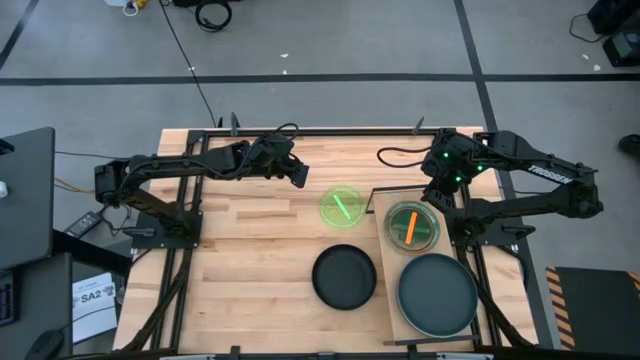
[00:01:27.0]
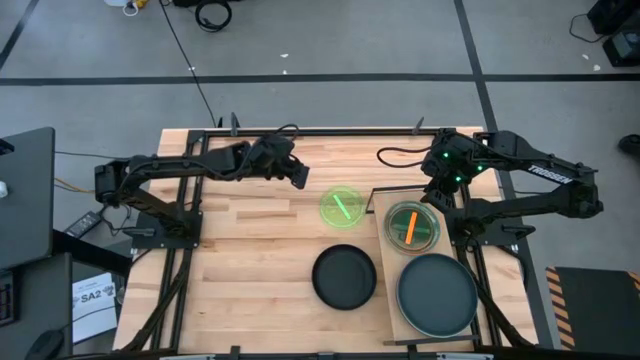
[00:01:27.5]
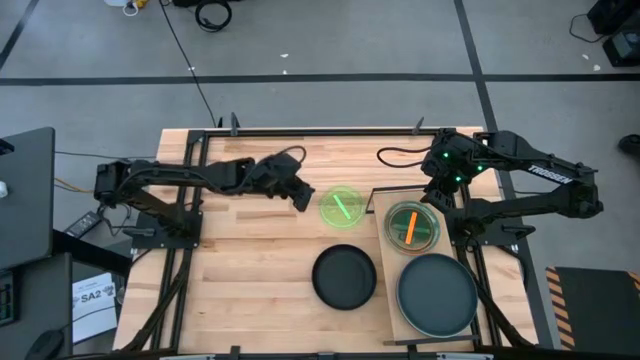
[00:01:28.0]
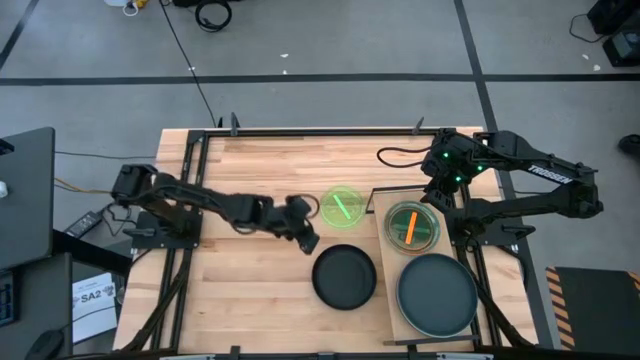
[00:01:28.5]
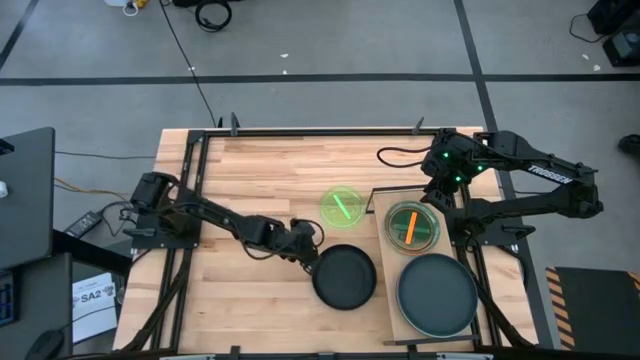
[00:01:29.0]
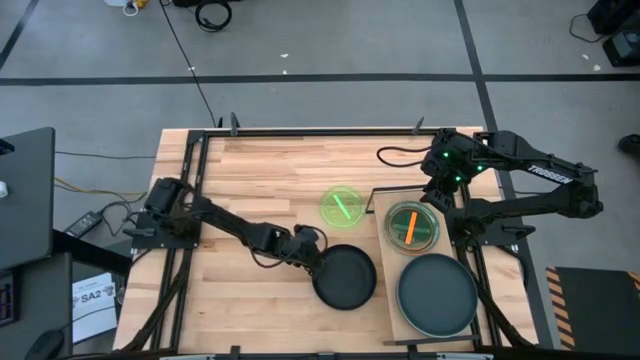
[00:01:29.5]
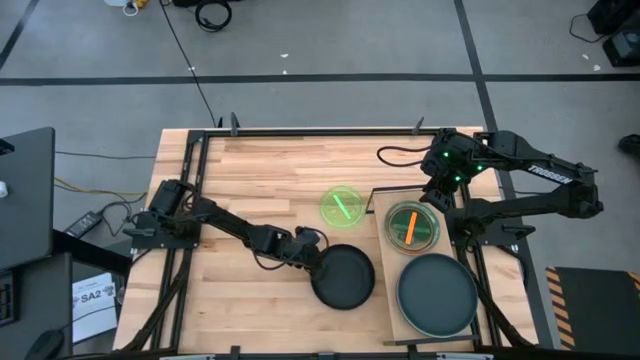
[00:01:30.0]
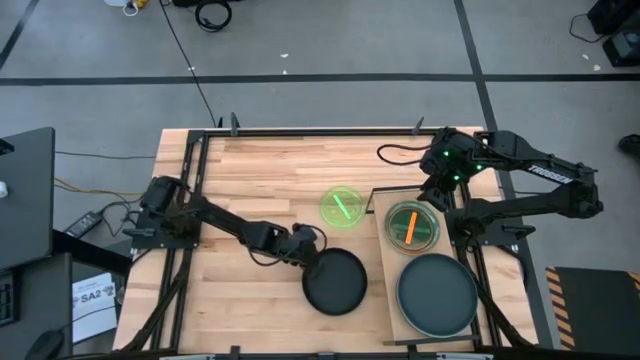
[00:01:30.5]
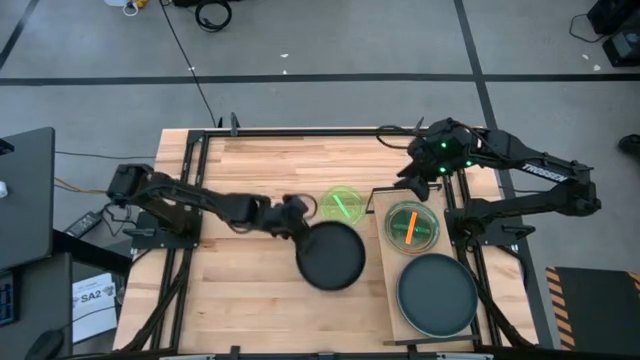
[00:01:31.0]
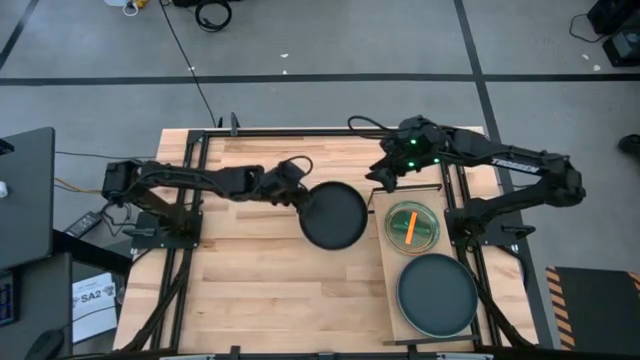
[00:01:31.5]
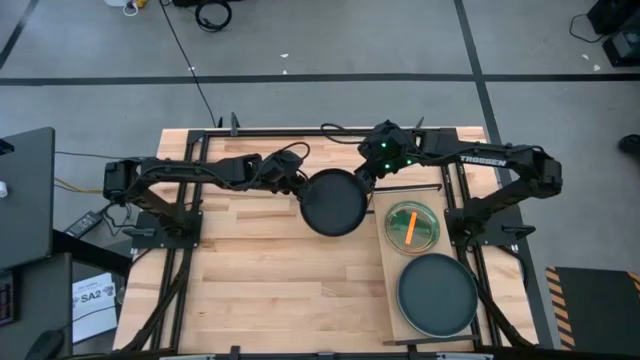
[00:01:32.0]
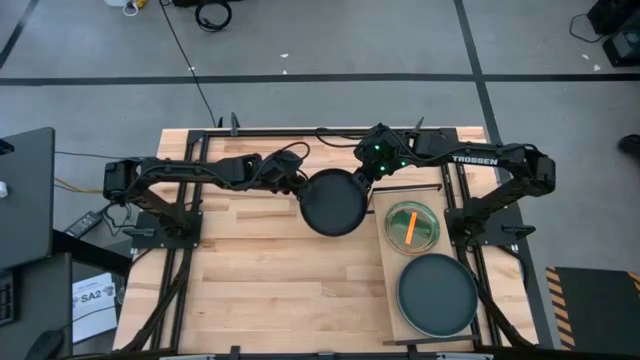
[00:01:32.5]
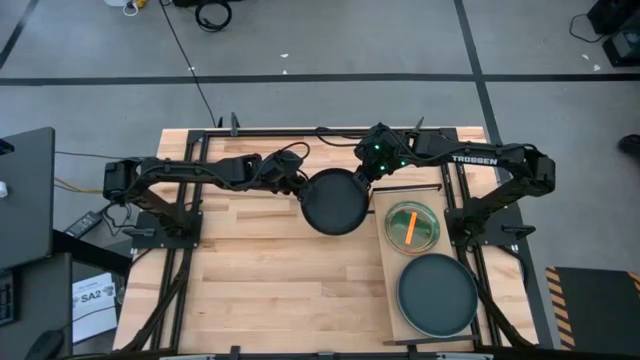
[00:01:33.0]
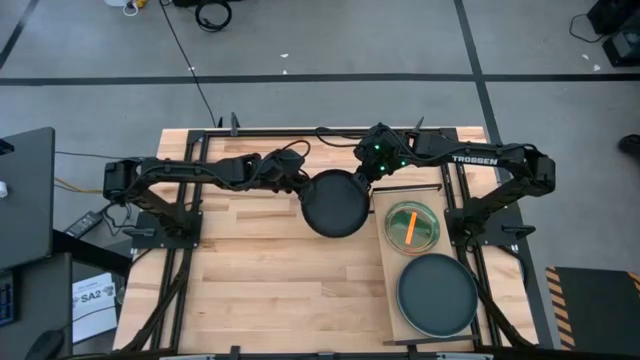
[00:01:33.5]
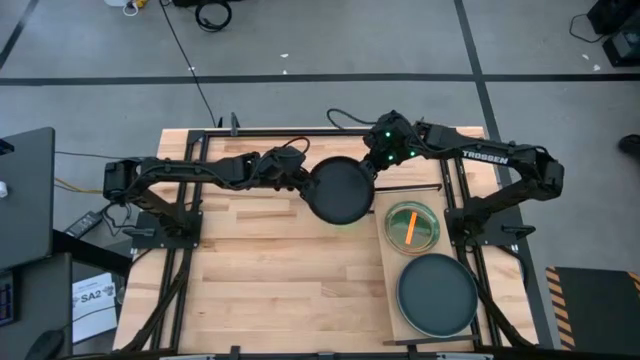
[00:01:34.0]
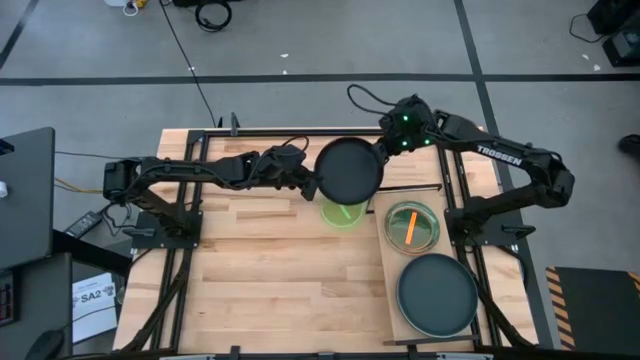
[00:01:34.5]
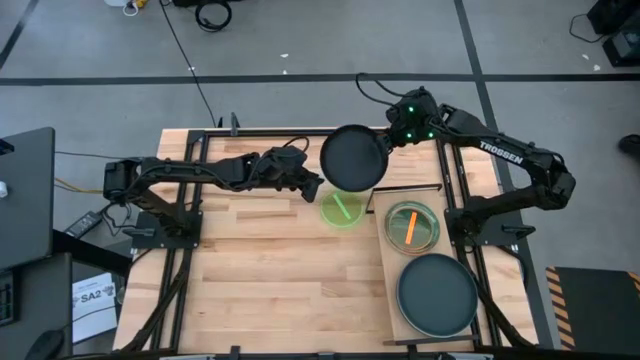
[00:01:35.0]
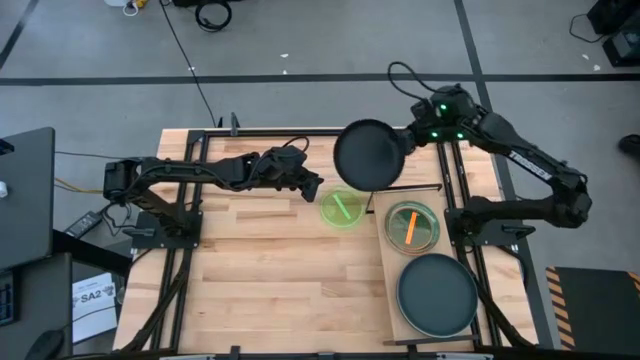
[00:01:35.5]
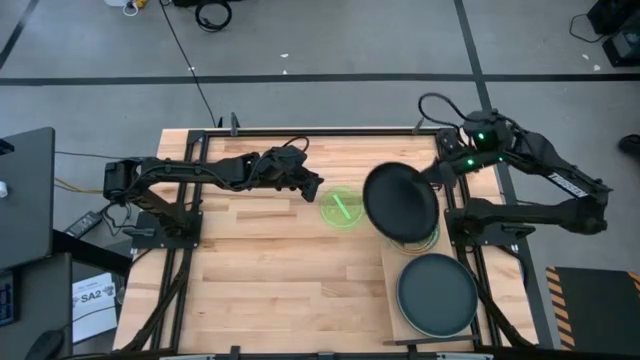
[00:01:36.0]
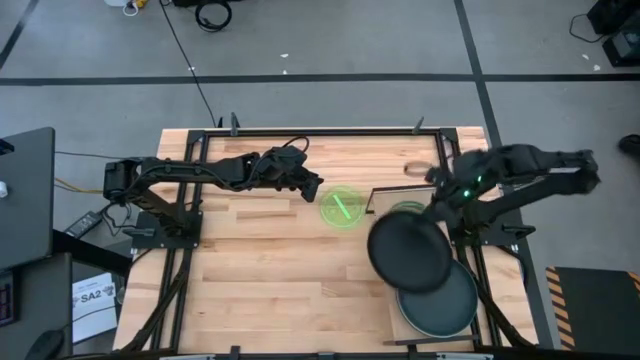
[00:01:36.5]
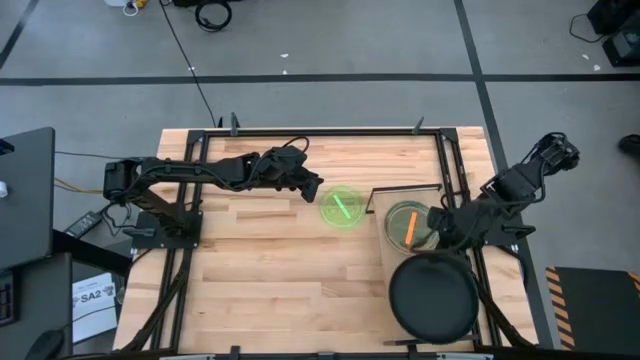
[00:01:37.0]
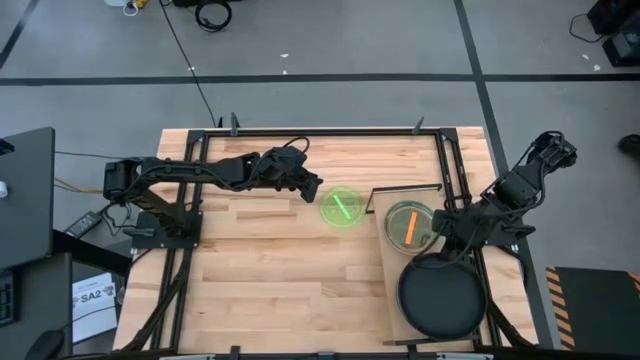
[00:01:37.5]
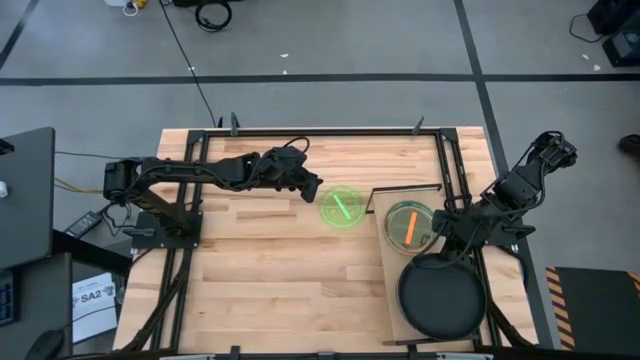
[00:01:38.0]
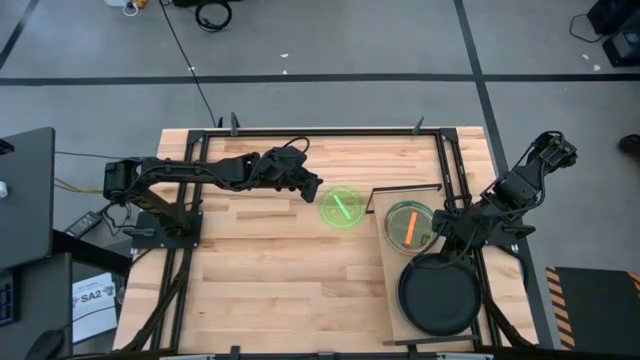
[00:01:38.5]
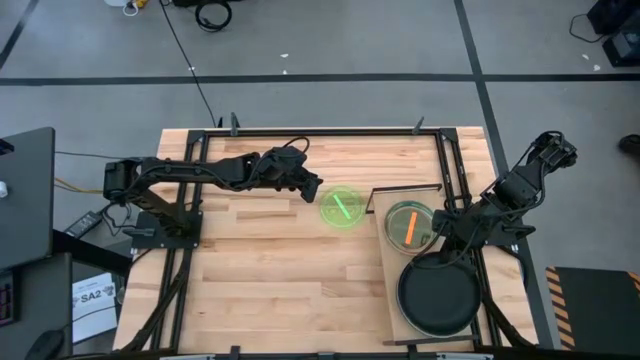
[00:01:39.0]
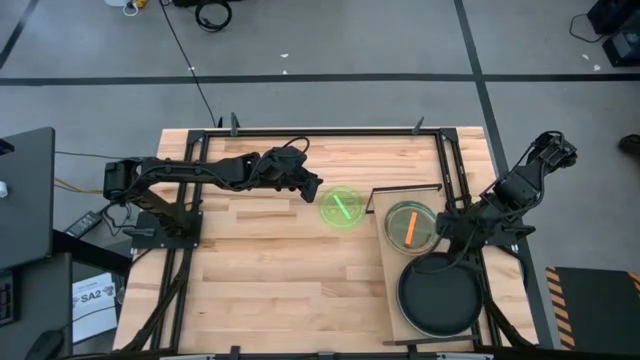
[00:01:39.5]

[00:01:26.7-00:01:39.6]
Task: Place and stack plates onto a shelf
Stack the black plate on top of the black plate on the shelf

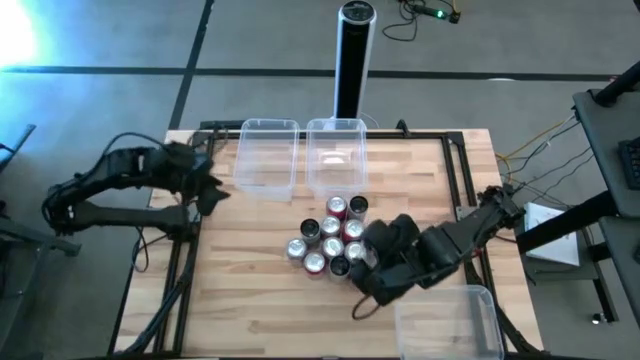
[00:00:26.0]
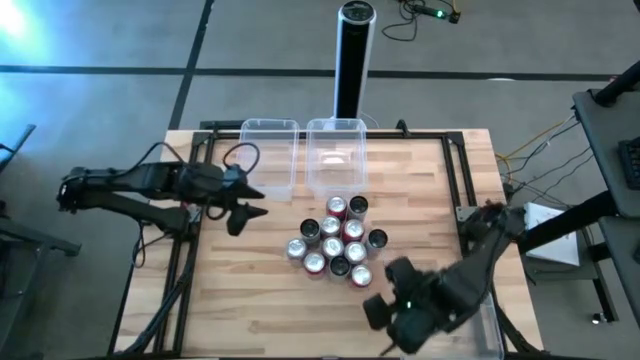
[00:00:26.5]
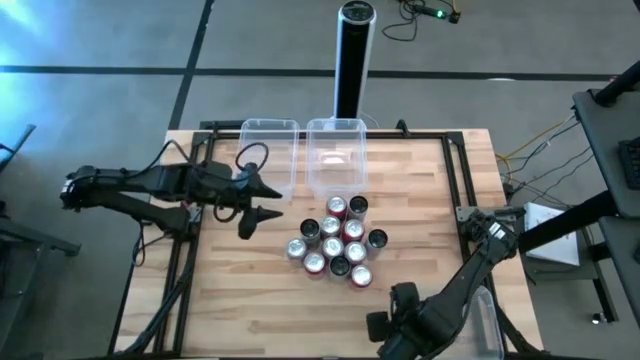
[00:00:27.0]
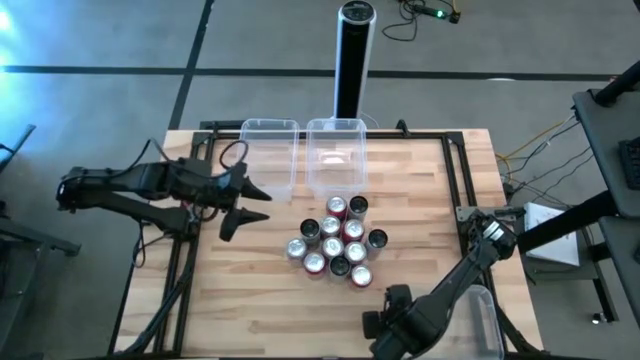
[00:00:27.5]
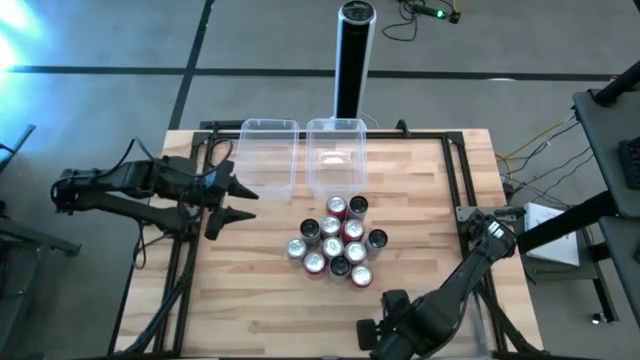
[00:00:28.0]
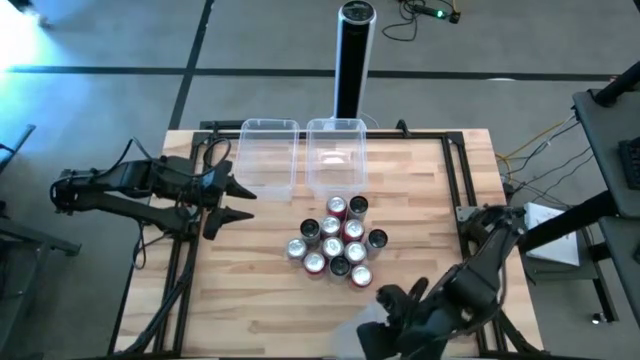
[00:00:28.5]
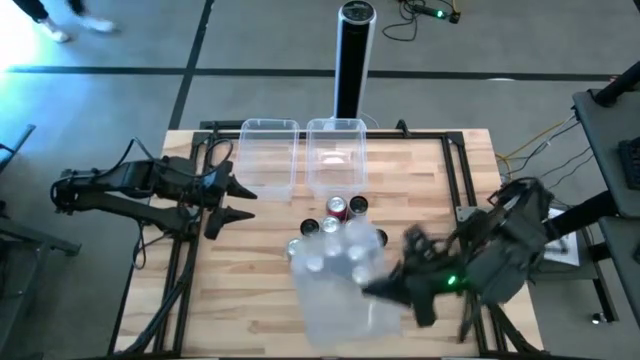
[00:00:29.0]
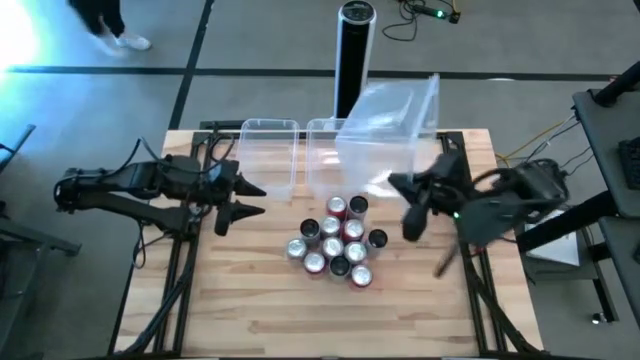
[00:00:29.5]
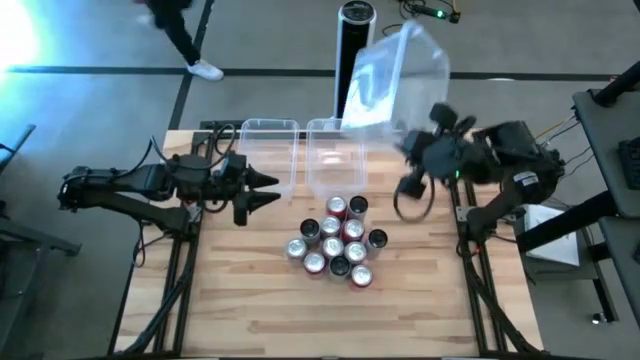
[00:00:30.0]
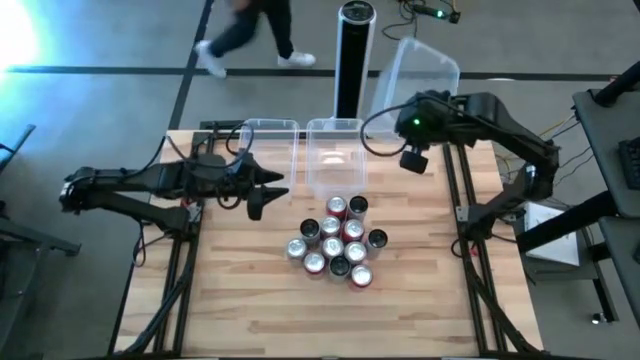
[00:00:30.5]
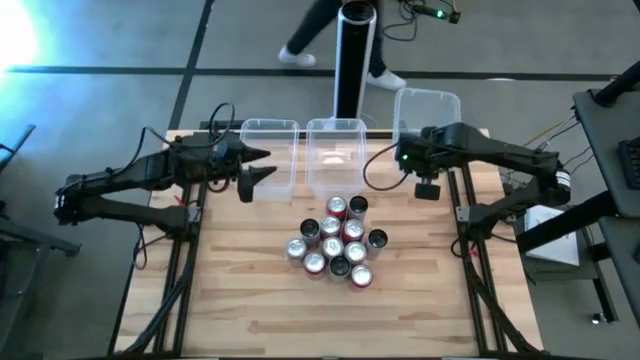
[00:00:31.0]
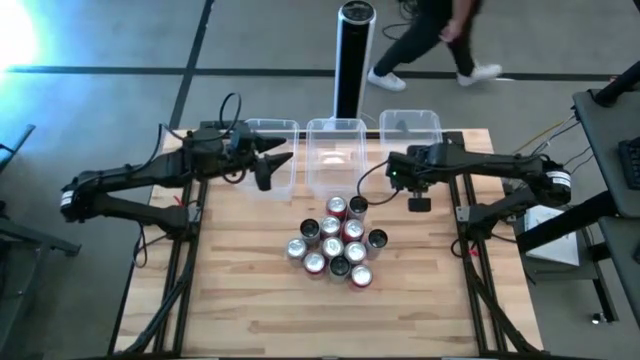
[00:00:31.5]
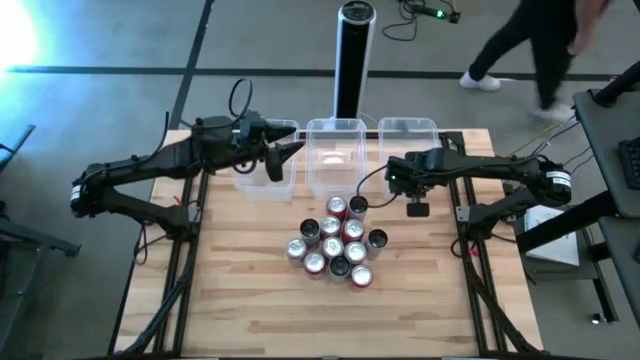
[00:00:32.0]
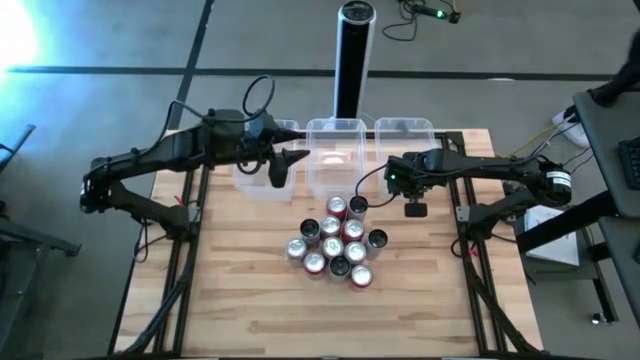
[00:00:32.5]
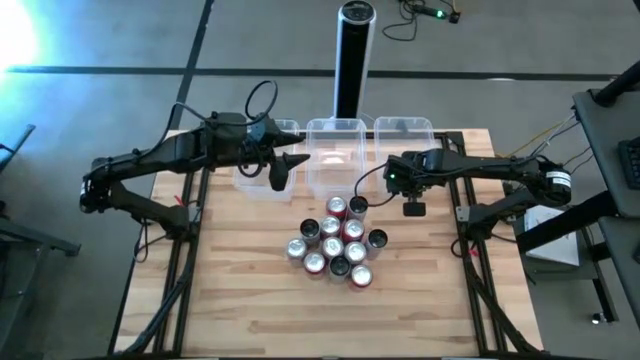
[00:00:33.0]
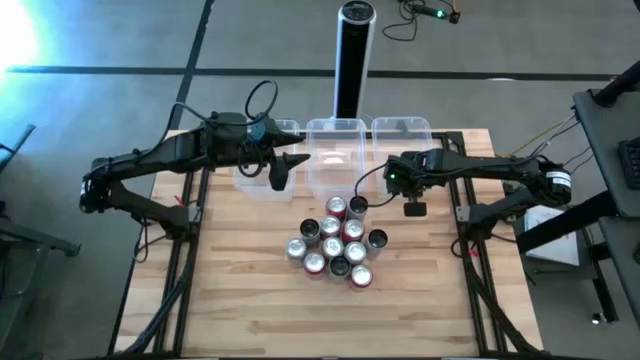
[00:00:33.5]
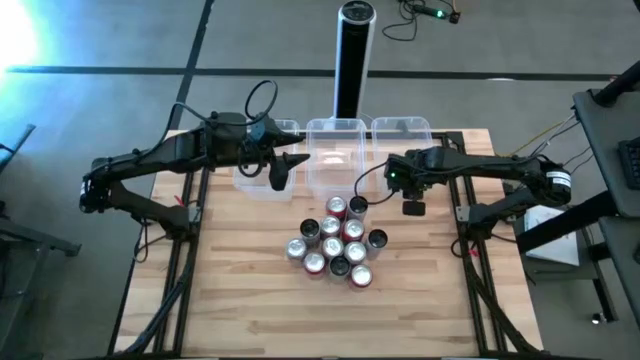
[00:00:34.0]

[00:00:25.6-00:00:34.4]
Task: Sort soda cans
Move the bottom right white bin to the right side of the center white bin
